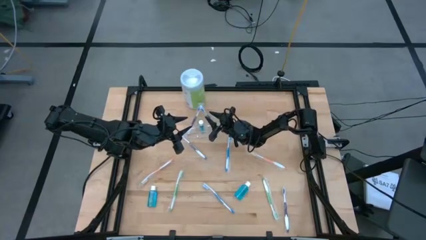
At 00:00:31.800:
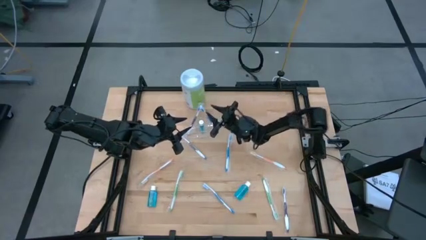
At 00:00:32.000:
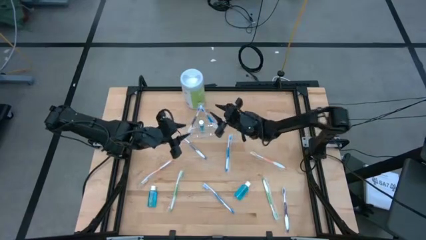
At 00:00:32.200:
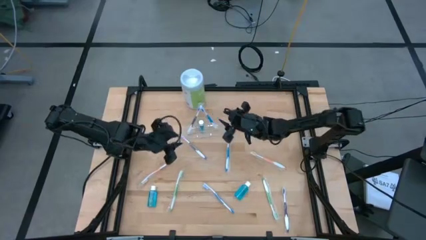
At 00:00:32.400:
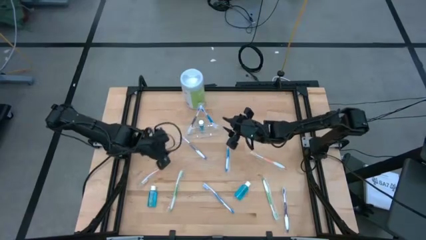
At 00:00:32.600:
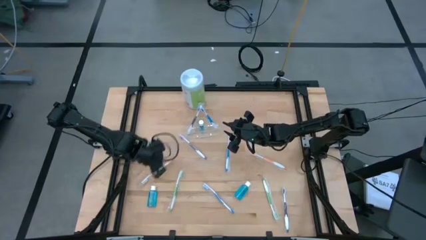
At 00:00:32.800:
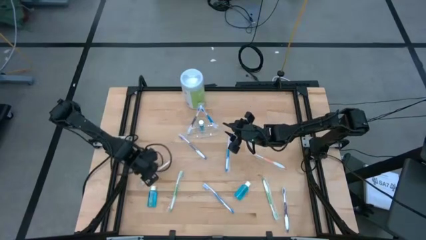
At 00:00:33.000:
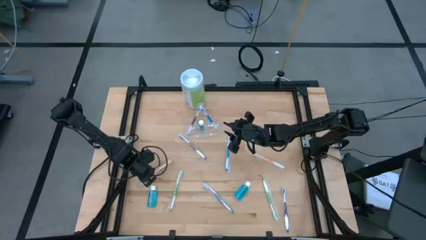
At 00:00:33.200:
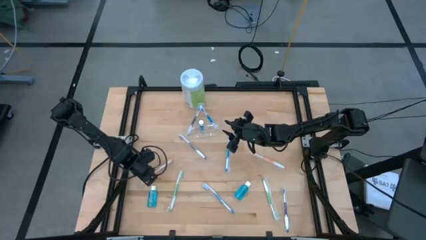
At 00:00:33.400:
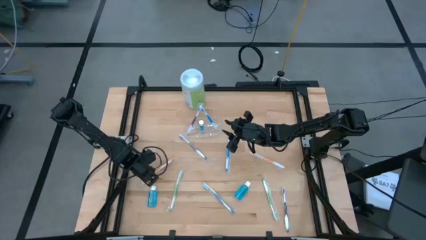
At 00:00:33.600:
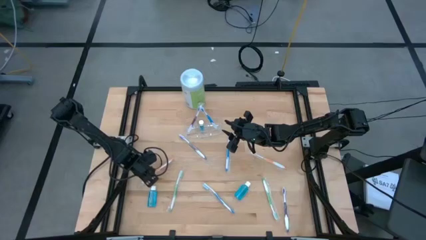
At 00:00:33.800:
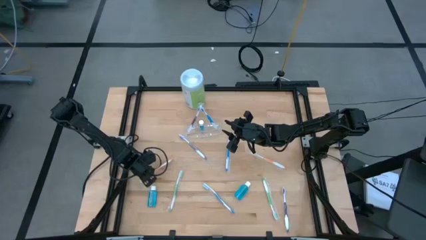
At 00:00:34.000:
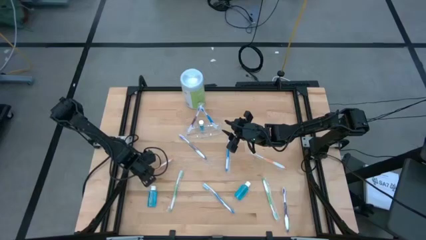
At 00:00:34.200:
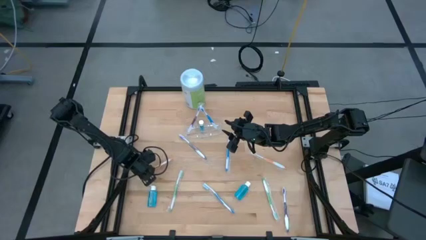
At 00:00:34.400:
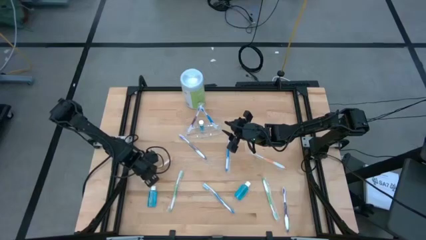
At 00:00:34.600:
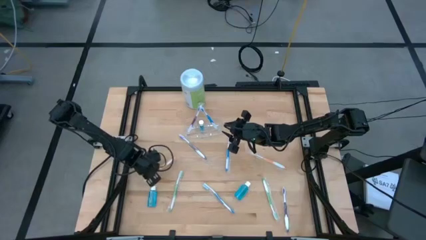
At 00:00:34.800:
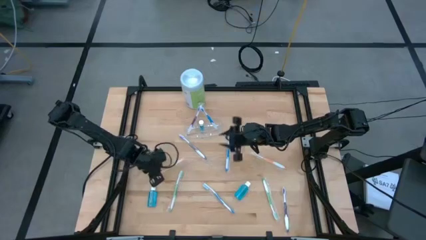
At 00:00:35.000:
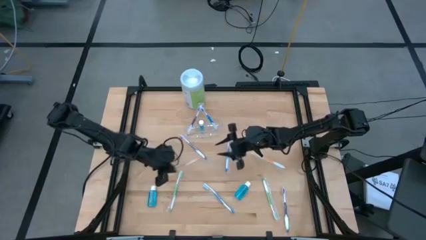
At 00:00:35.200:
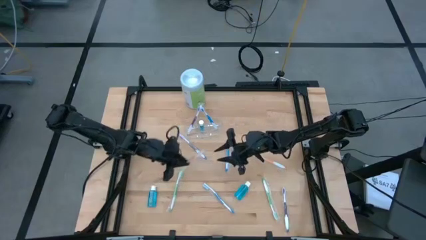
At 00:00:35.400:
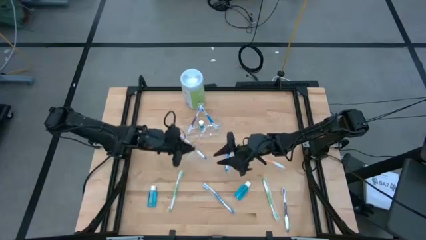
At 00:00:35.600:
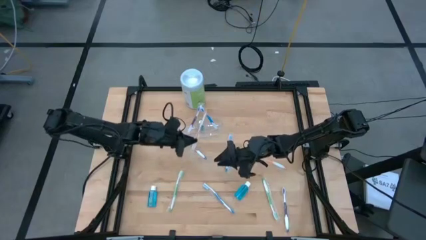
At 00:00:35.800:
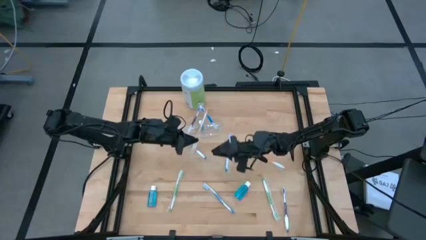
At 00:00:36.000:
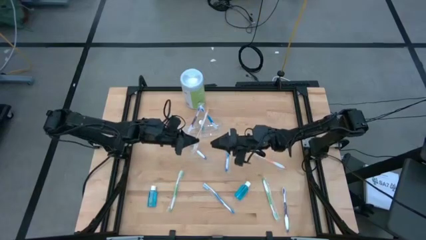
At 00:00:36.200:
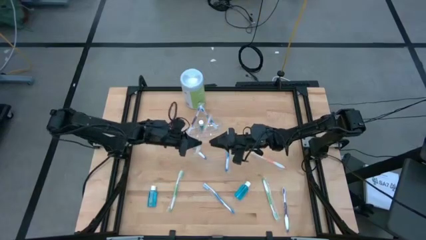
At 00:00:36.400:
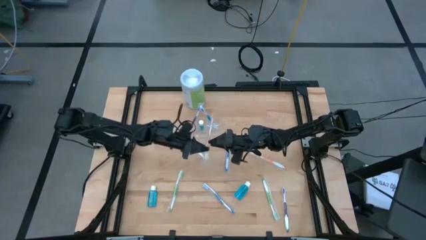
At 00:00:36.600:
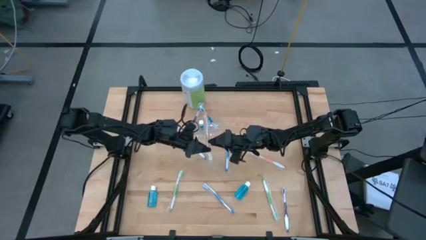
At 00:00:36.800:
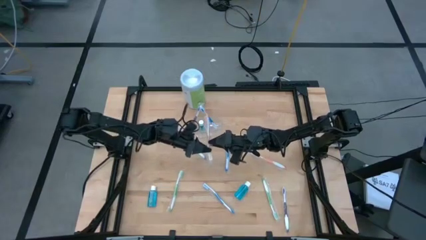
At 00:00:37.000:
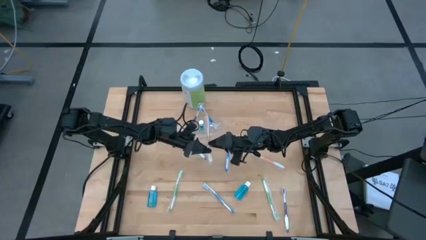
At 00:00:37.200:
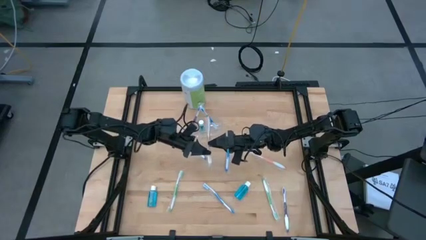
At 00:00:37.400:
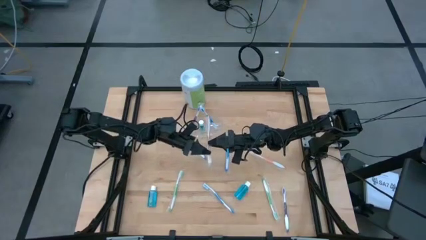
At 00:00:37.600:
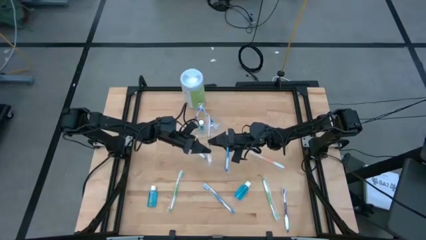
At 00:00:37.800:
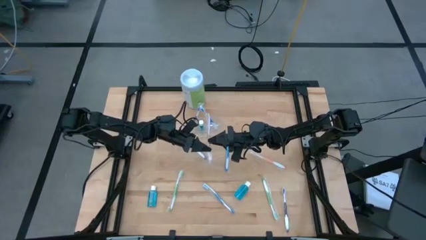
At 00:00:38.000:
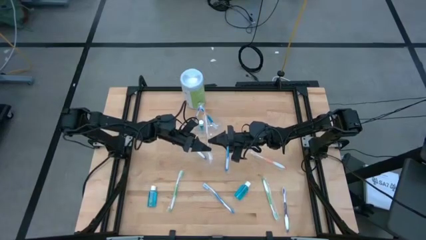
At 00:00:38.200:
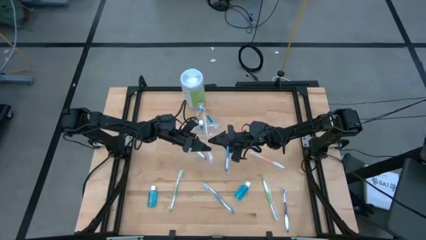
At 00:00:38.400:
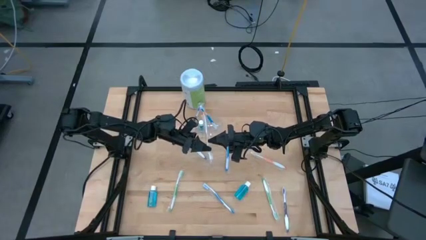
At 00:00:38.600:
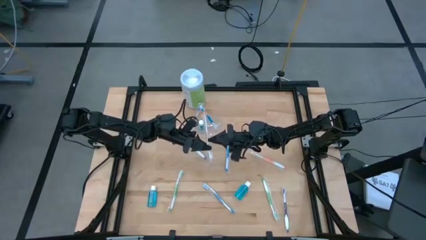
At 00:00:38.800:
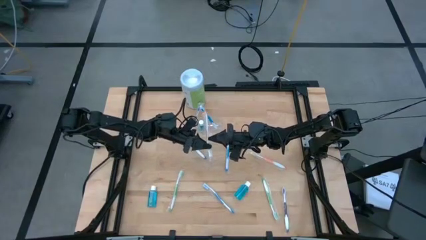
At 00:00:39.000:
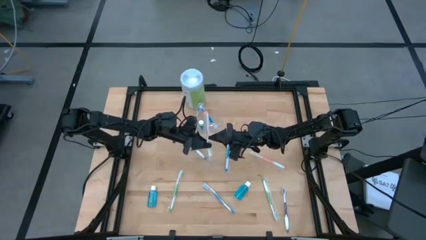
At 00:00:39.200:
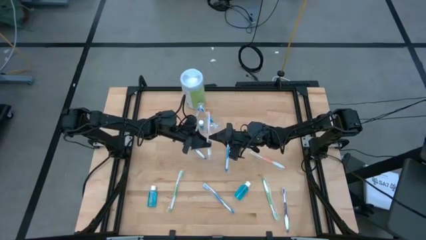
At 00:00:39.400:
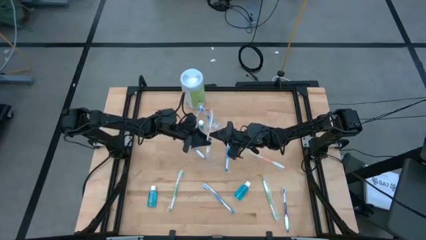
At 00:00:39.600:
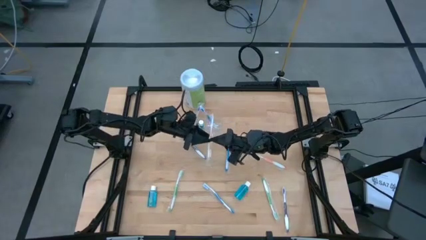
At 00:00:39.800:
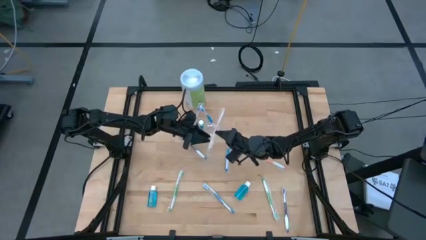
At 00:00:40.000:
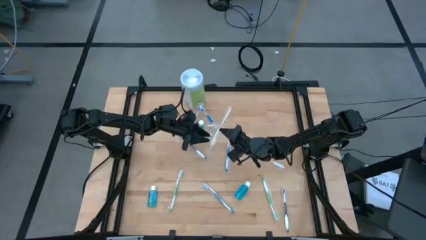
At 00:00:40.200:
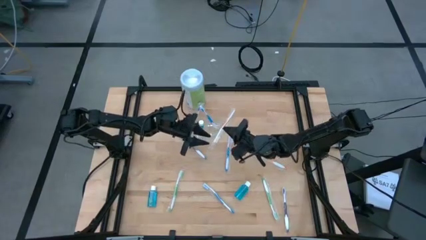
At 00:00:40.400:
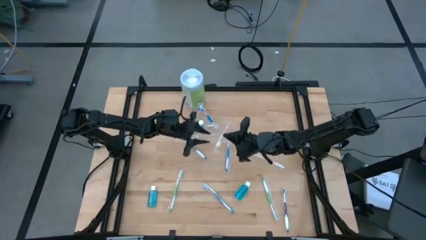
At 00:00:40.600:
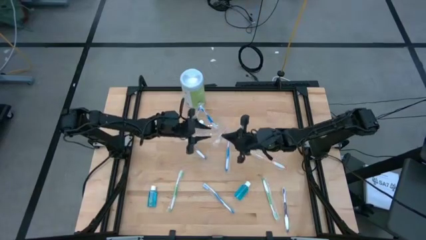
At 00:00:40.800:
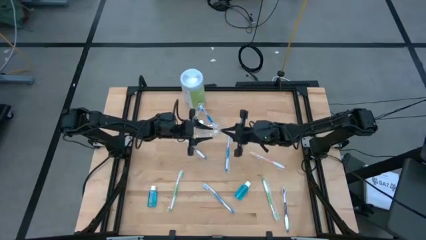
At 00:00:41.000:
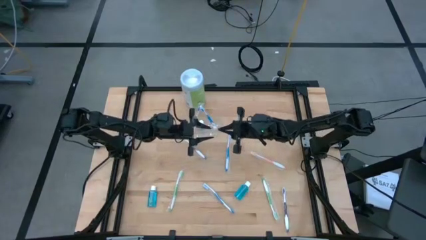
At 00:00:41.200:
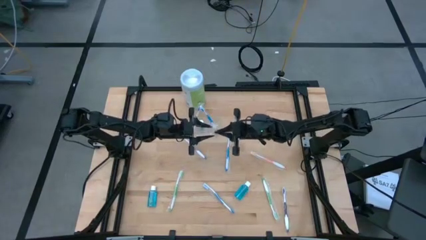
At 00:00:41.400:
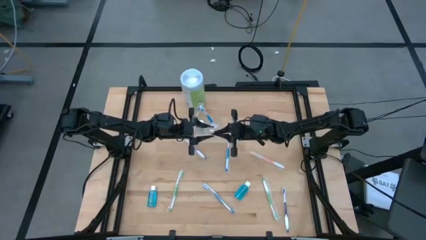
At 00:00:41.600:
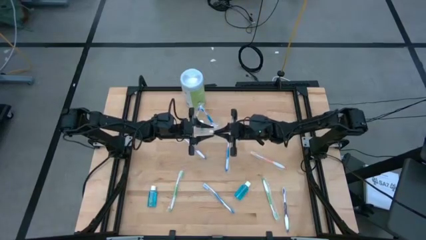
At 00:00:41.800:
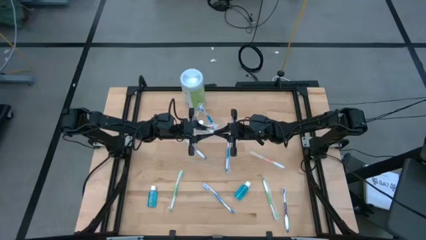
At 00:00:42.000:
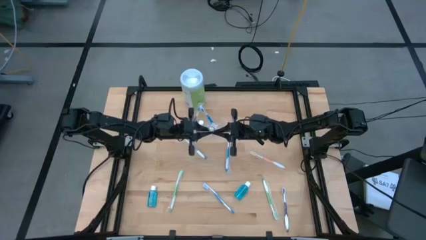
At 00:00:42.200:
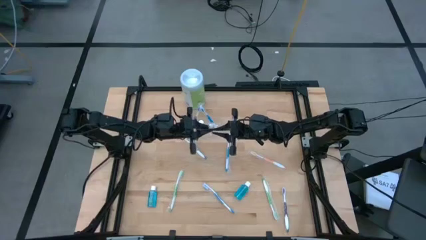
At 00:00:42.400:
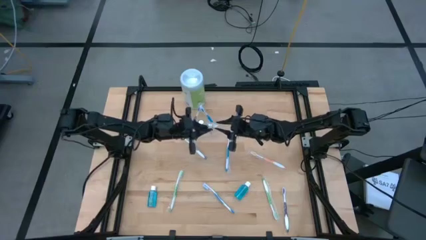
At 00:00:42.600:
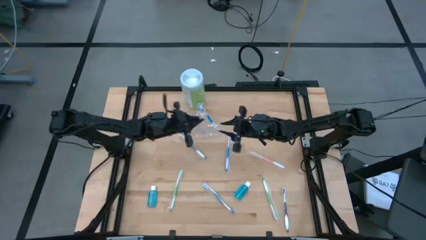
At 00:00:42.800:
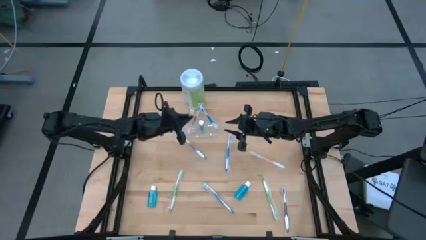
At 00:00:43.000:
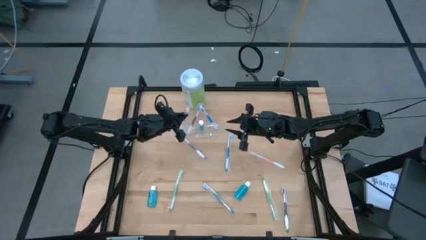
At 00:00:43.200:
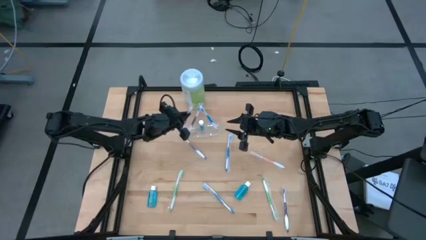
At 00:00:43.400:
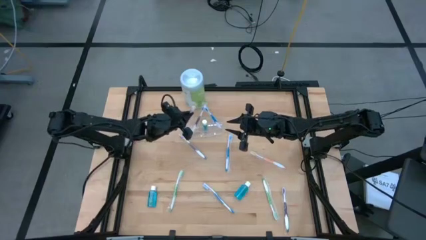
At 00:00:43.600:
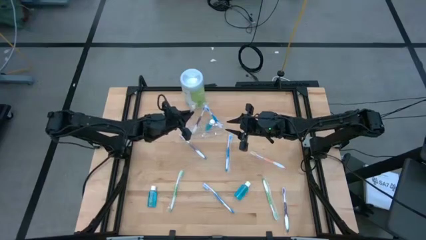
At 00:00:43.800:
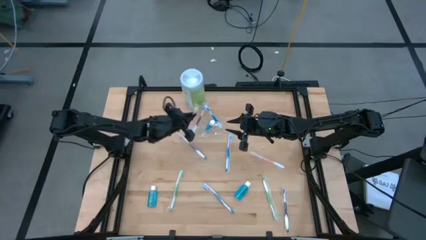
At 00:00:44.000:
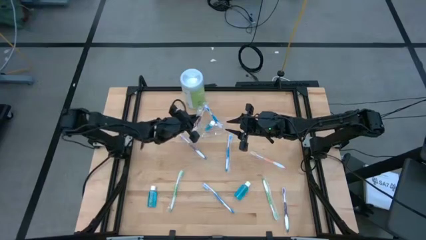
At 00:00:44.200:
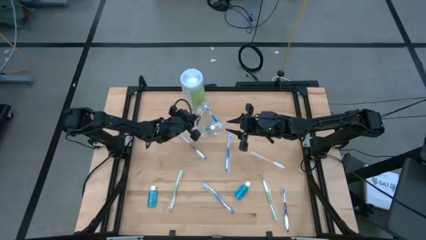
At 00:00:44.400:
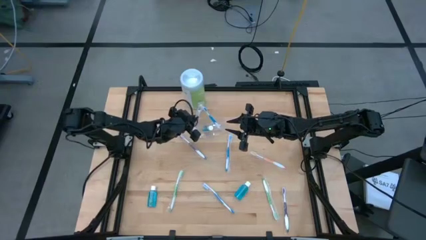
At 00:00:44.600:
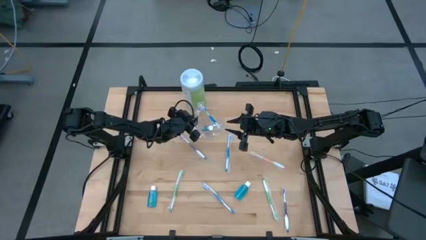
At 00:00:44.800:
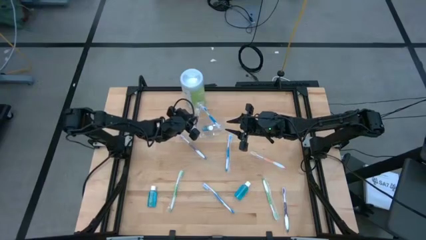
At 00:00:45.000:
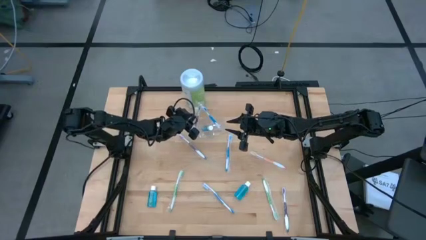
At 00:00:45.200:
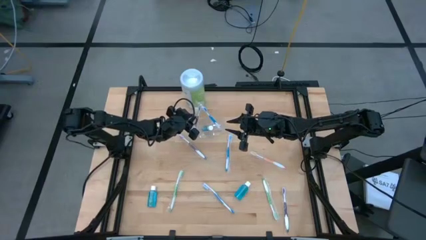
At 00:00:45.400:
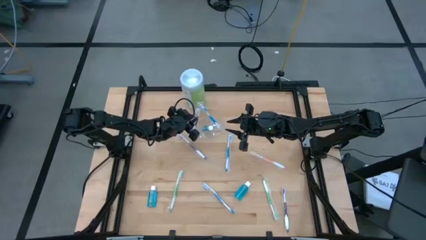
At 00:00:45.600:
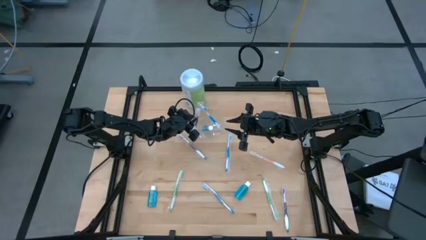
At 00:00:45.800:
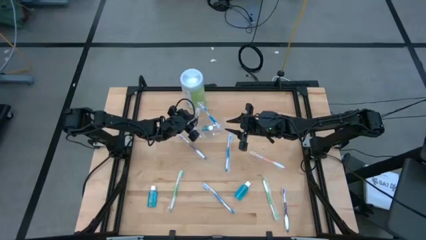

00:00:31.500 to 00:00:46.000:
Task: Pick & Place toothbrushing station
Put the left orange toothbrush into the left side of the transparent organizer
